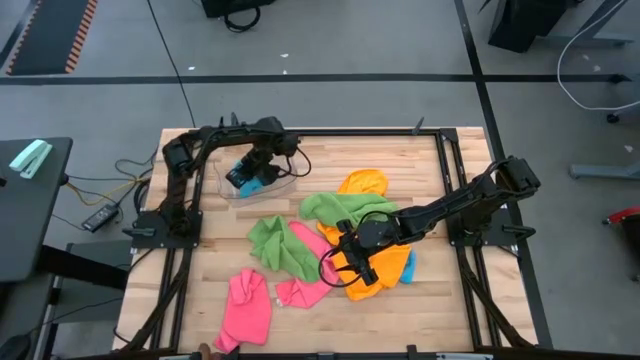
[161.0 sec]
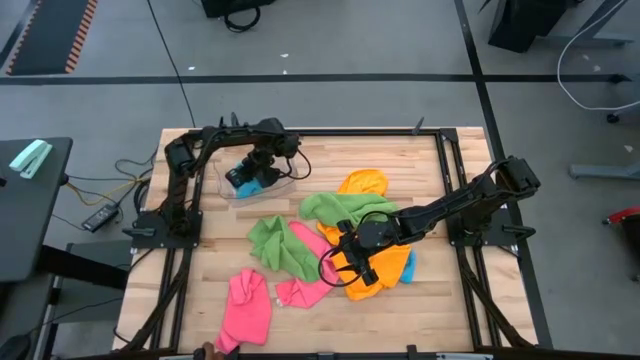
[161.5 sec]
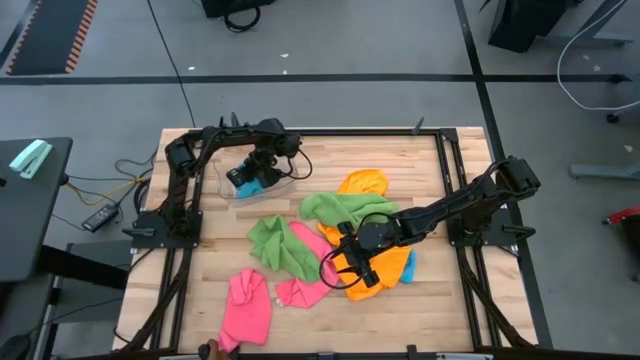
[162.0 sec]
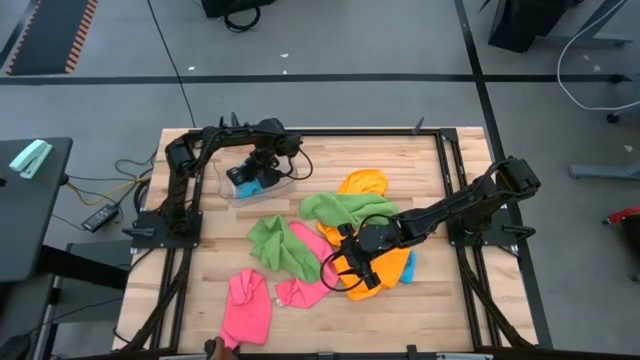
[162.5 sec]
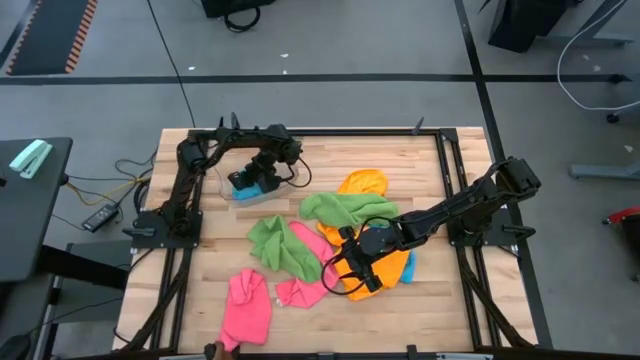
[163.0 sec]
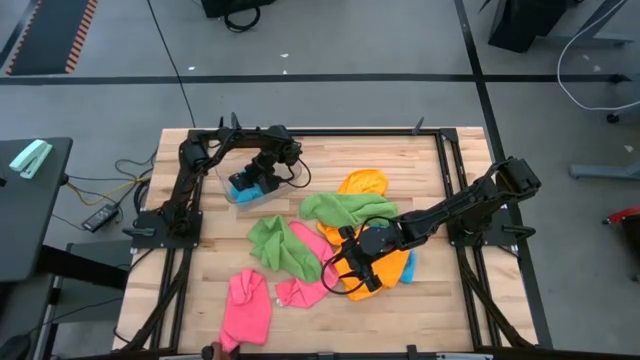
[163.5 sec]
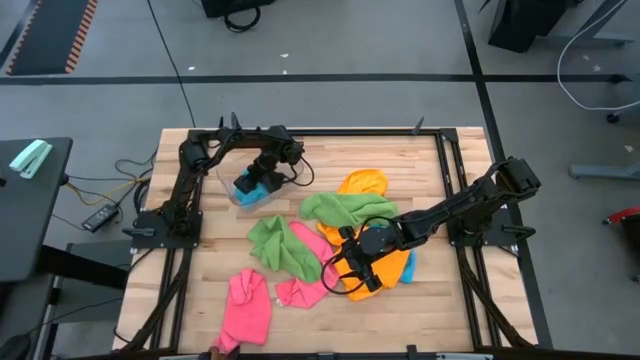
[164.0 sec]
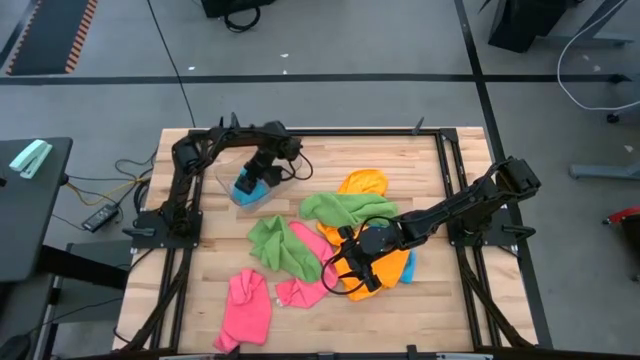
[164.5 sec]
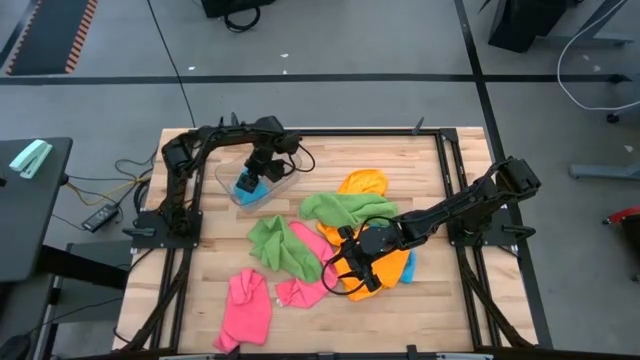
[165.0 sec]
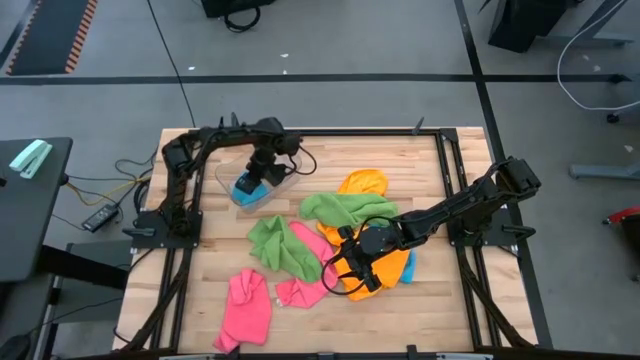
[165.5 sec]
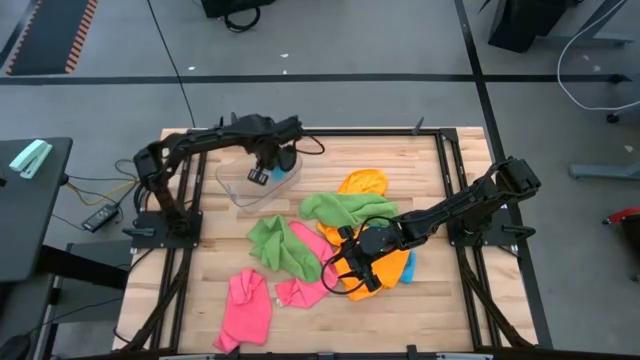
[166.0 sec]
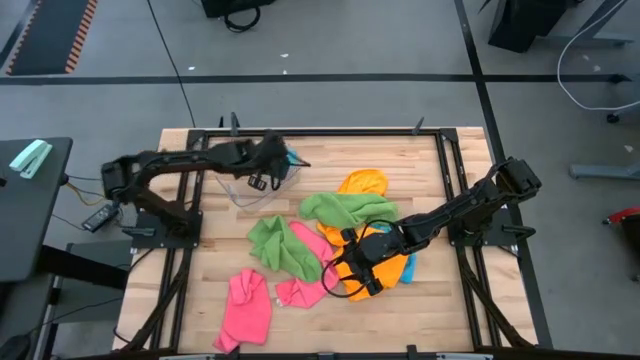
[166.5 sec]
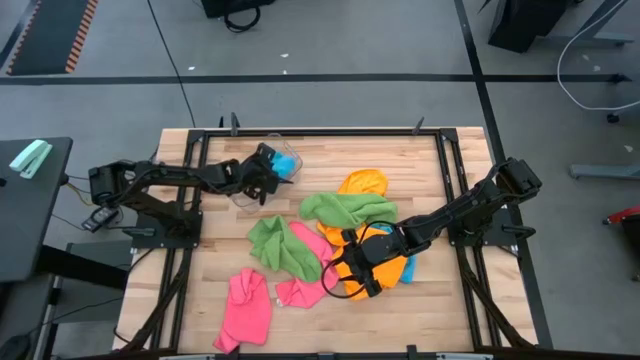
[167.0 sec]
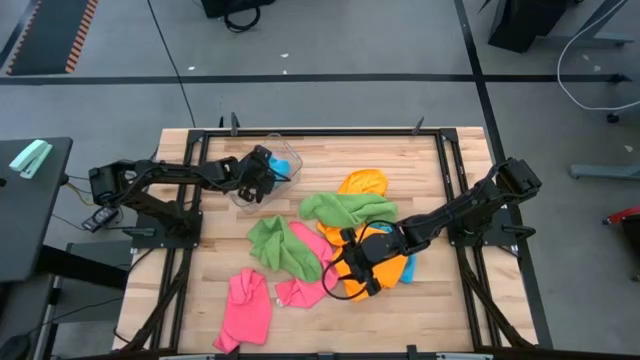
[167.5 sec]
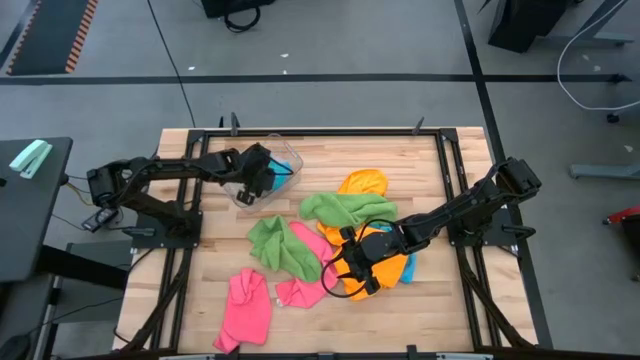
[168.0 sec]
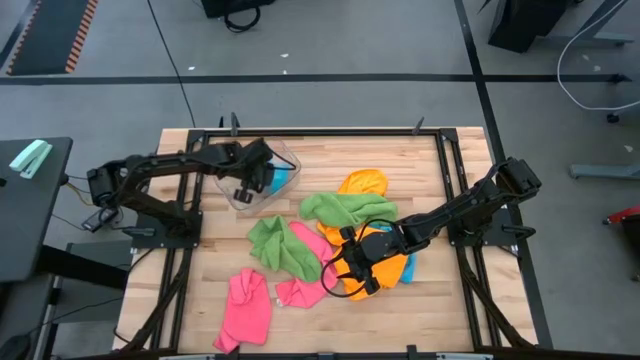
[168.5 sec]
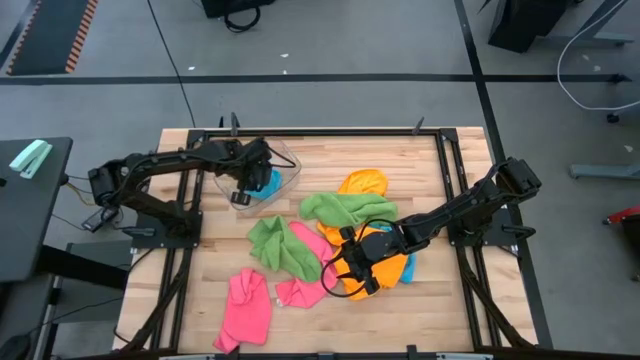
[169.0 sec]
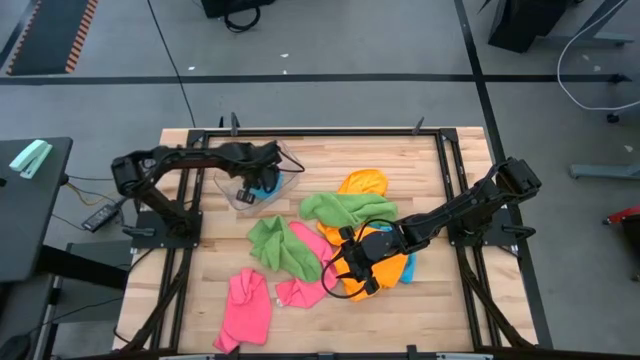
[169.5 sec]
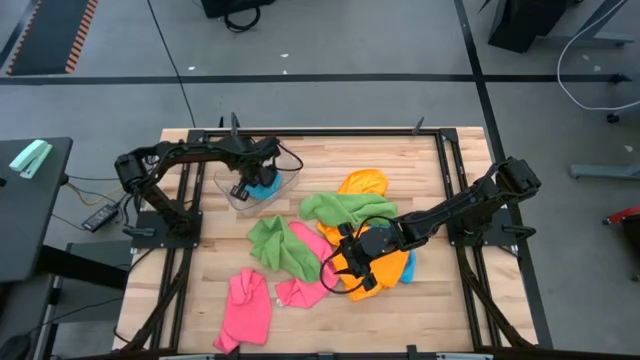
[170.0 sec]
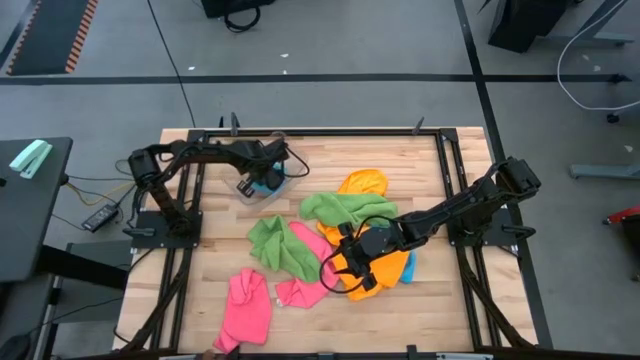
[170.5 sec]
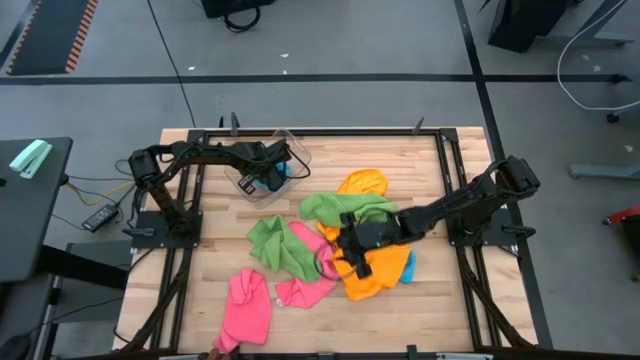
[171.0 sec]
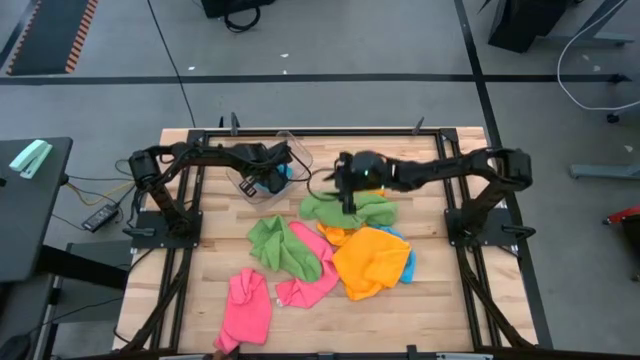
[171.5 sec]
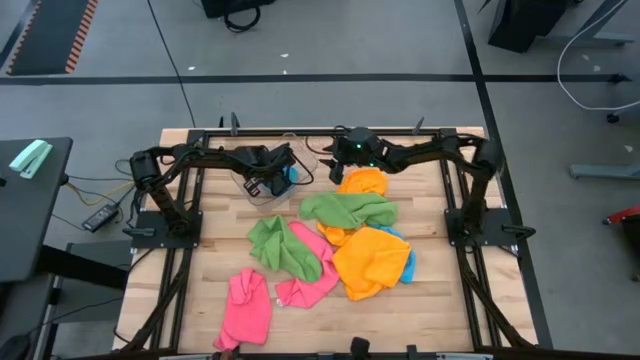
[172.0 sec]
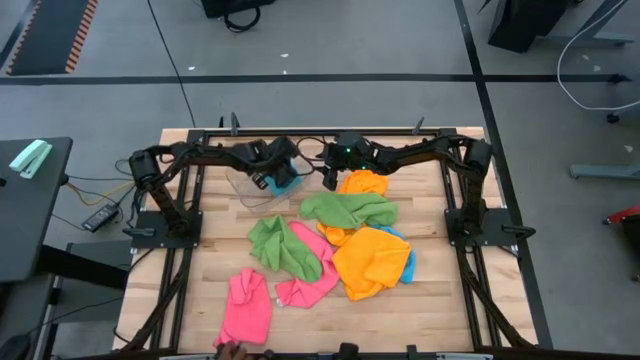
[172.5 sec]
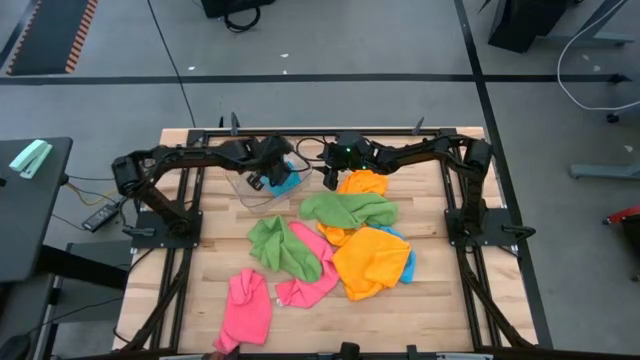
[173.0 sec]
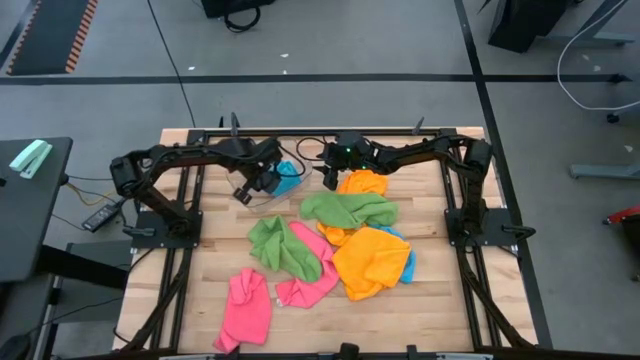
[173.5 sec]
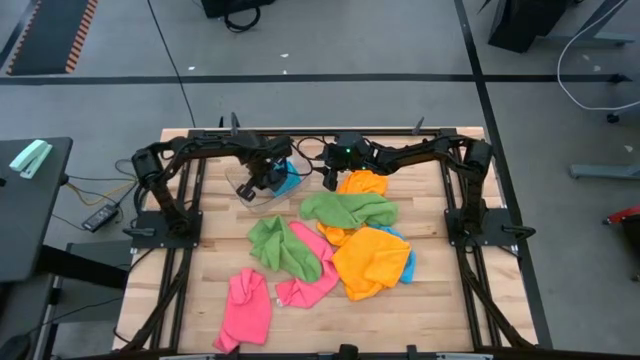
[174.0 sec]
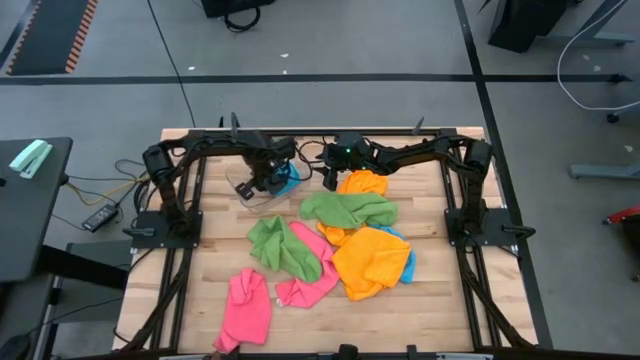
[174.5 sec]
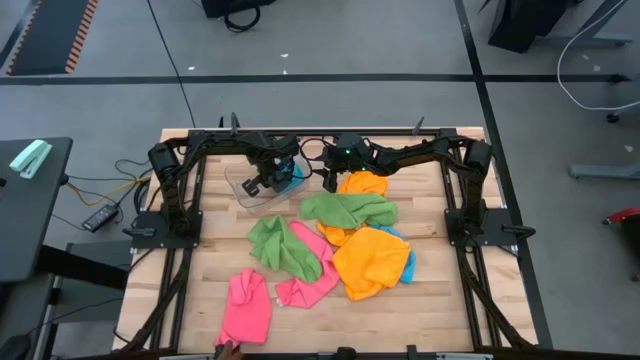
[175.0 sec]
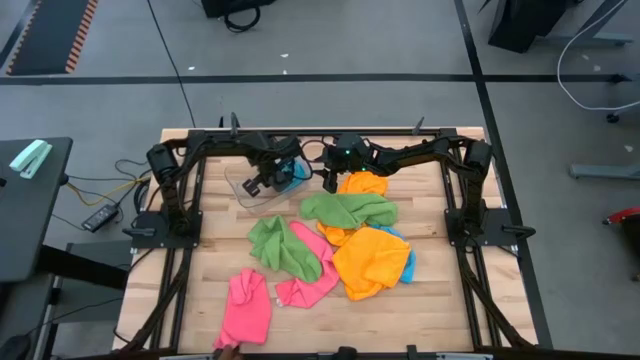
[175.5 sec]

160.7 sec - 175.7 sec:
Task: Fold microfiber towels
Put the left blue microfiber towel into the transparent bin

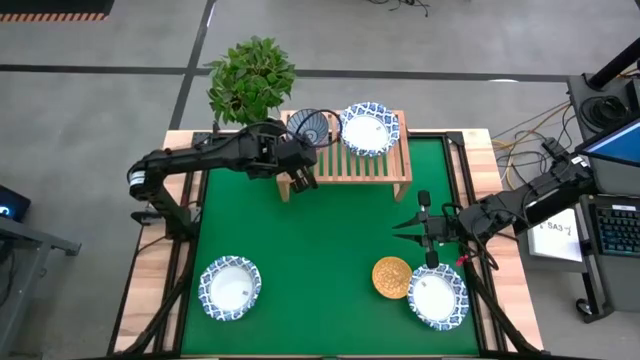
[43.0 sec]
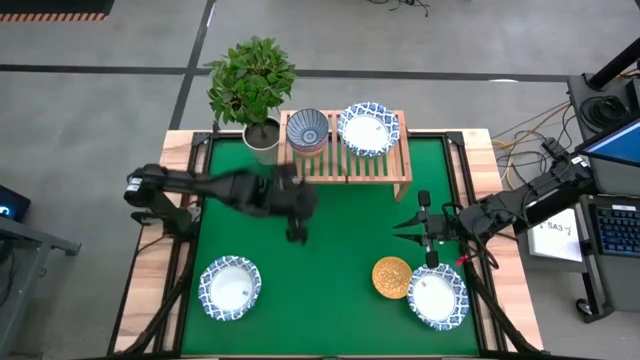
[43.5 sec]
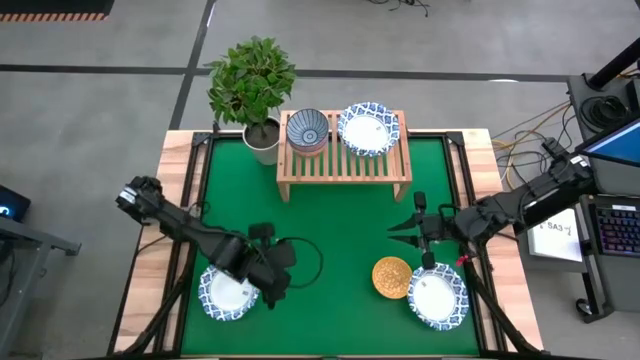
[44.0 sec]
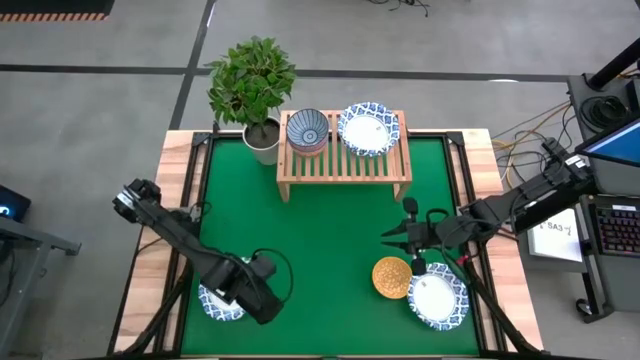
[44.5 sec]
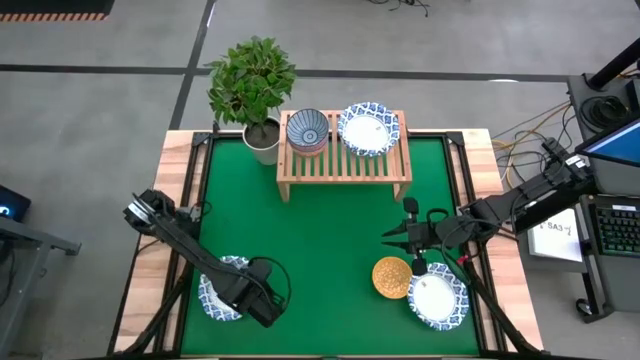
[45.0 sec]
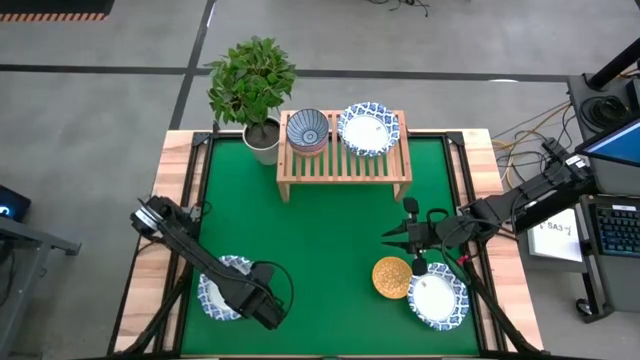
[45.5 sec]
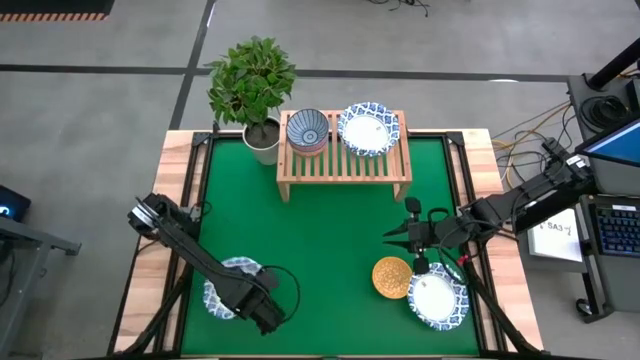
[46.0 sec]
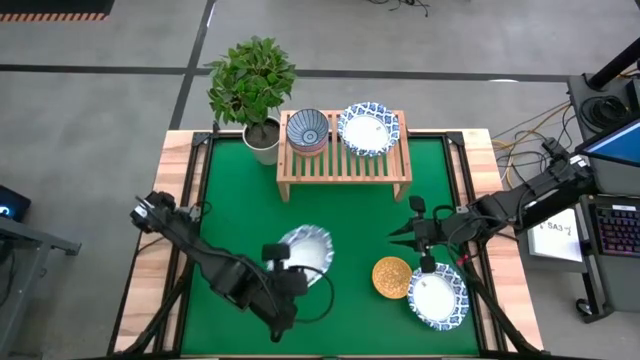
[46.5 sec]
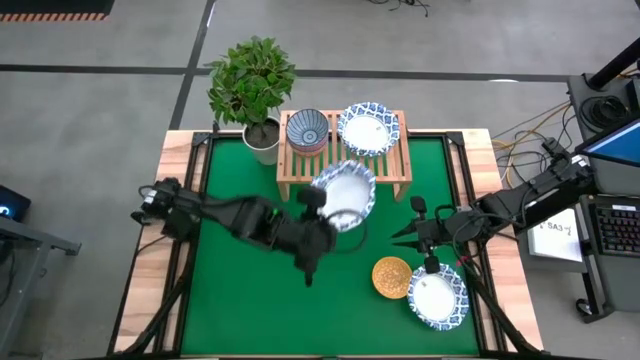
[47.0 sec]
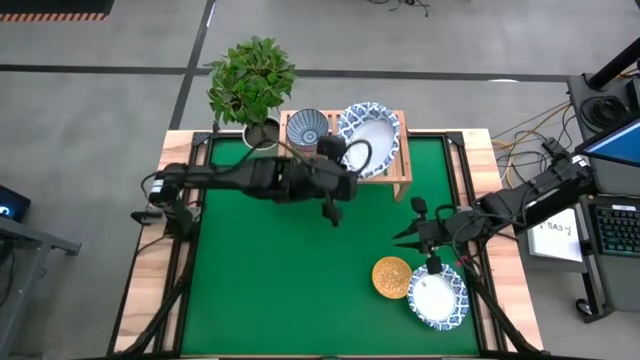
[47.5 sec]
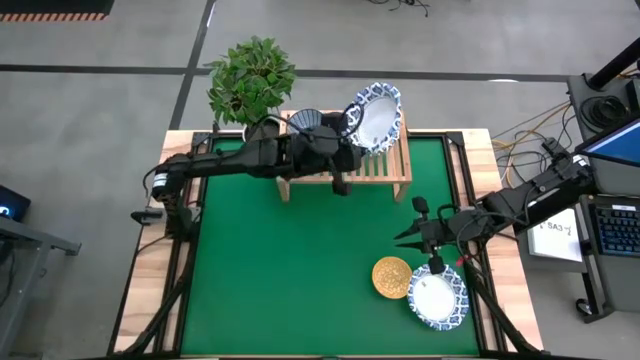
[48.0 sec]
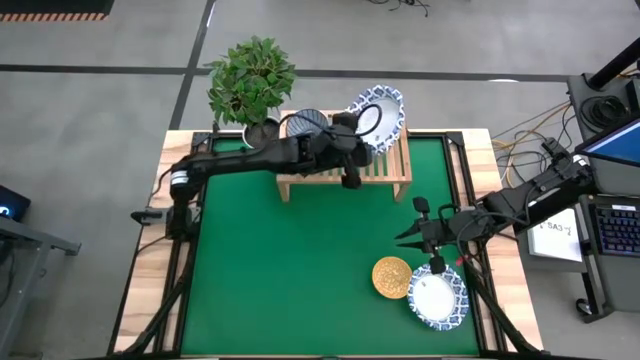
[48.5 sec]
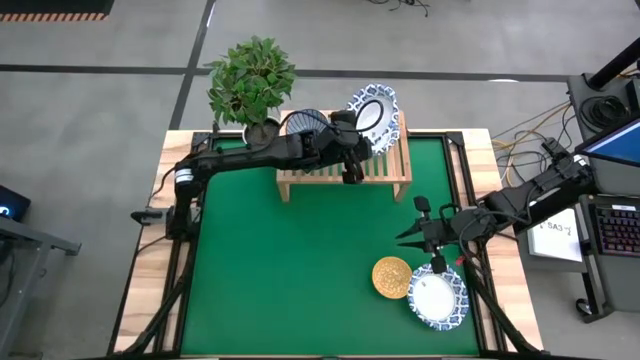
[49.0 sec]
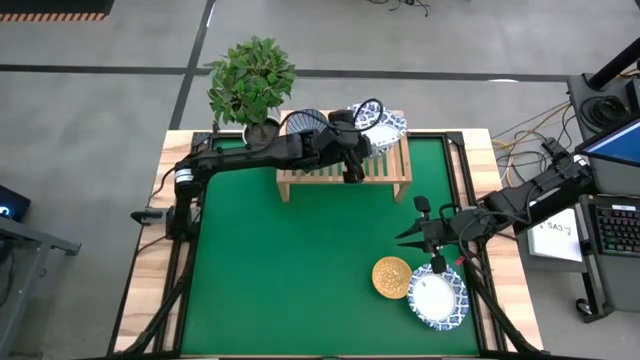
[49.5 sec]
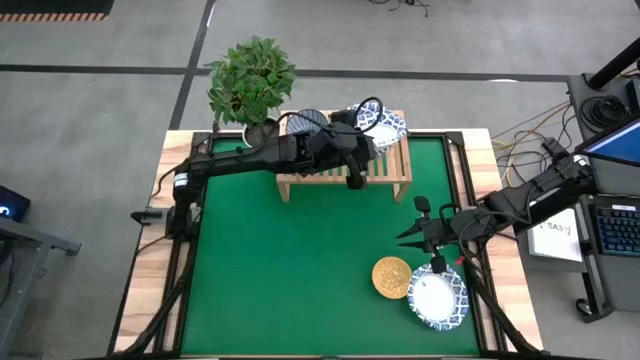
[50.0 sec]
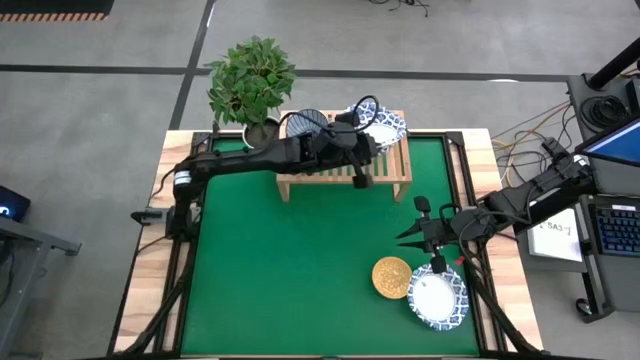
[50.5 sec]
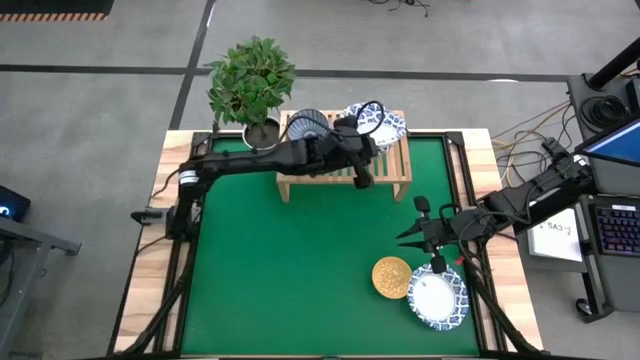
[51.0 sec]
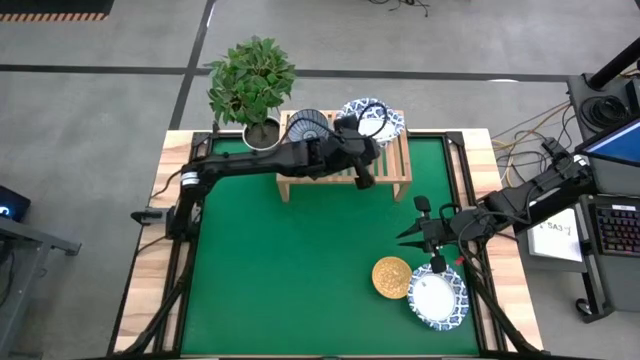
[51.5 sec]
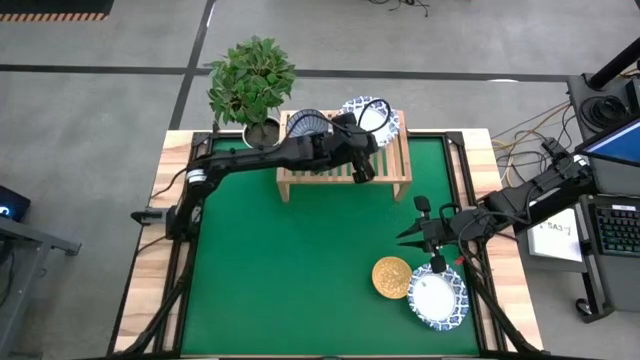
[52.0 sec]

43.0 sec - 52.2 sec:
Task: Place and stack bowls onto a shelf
Stack the blue patterned bowl on top of the blue patterned bowl on the shelf
